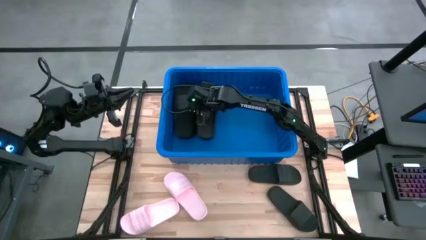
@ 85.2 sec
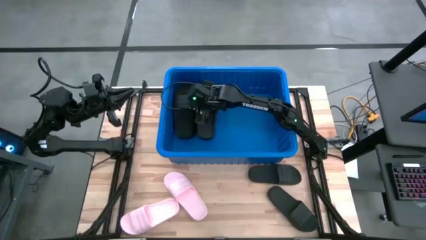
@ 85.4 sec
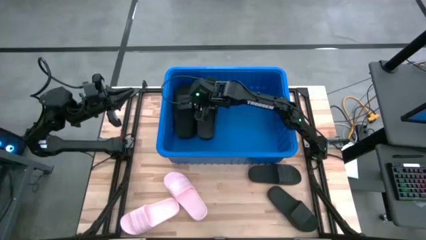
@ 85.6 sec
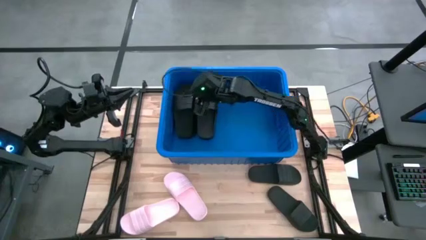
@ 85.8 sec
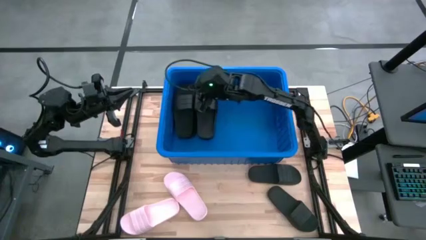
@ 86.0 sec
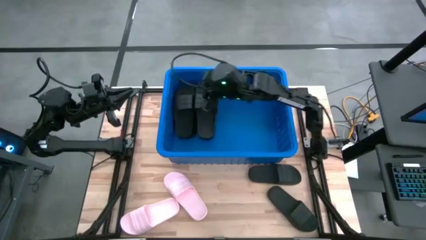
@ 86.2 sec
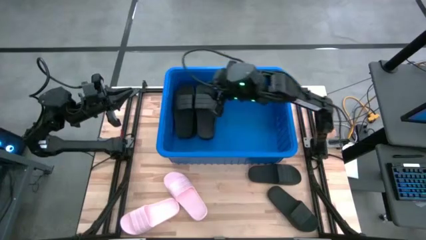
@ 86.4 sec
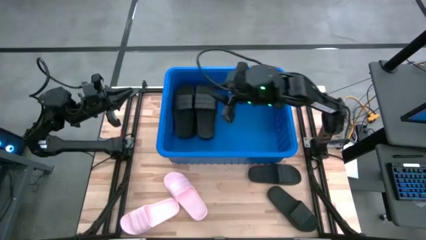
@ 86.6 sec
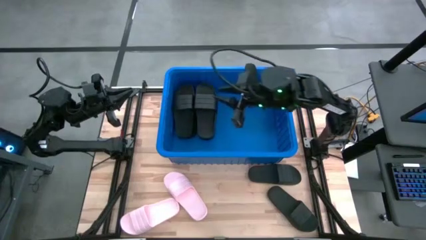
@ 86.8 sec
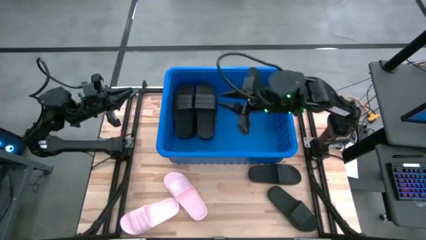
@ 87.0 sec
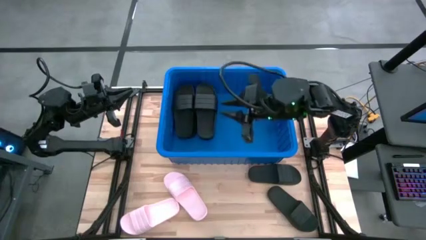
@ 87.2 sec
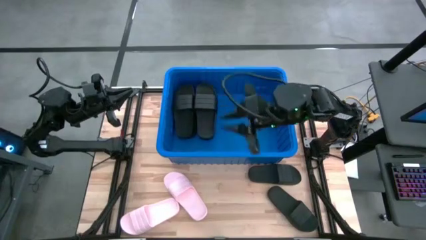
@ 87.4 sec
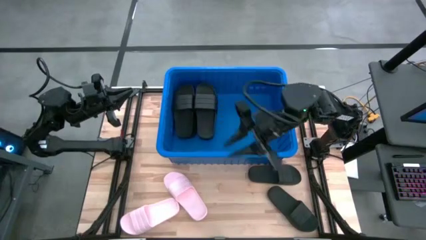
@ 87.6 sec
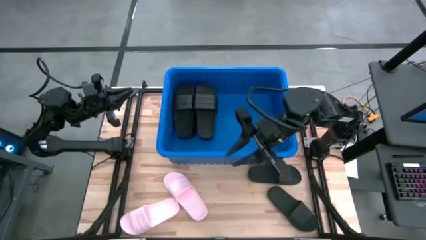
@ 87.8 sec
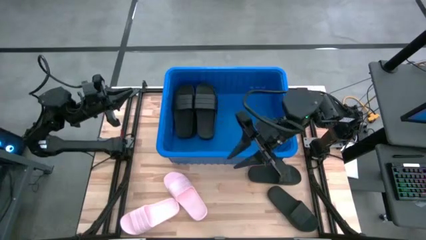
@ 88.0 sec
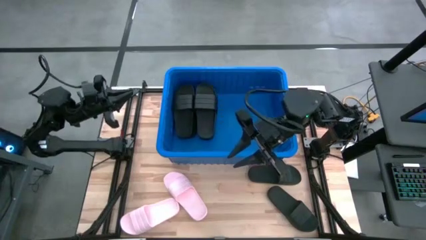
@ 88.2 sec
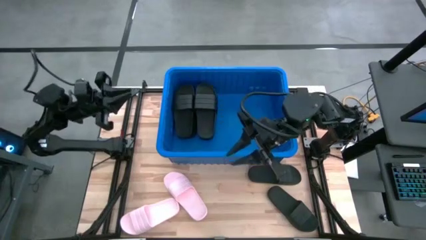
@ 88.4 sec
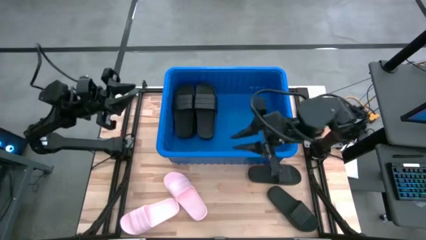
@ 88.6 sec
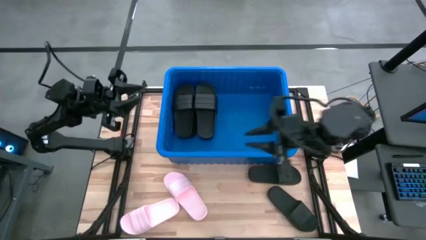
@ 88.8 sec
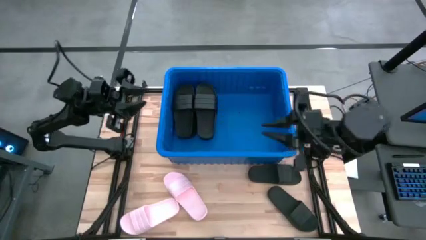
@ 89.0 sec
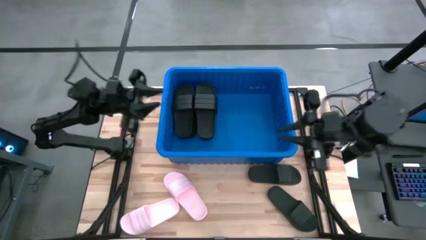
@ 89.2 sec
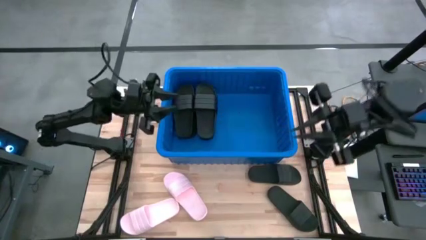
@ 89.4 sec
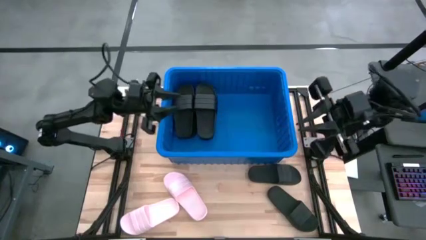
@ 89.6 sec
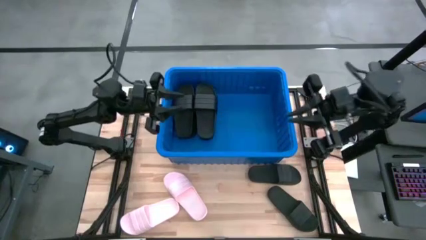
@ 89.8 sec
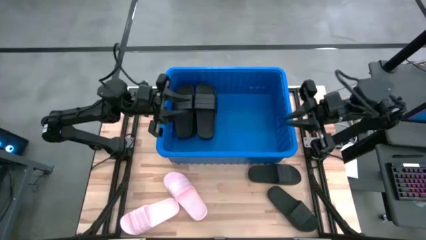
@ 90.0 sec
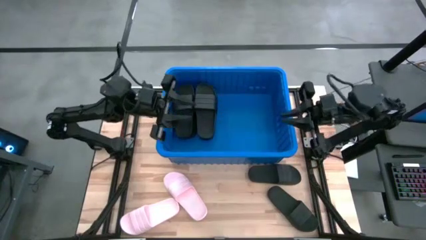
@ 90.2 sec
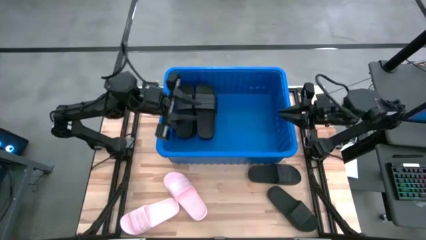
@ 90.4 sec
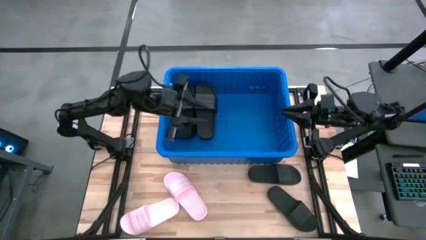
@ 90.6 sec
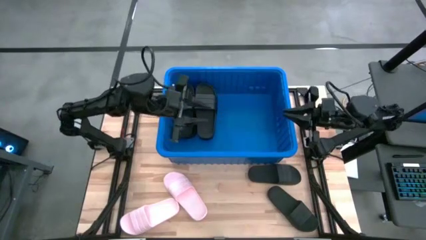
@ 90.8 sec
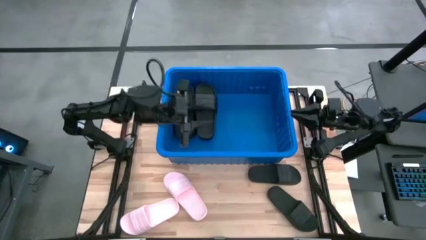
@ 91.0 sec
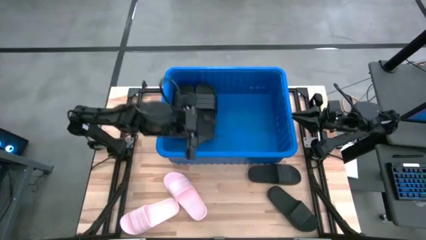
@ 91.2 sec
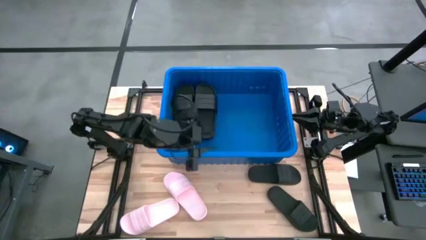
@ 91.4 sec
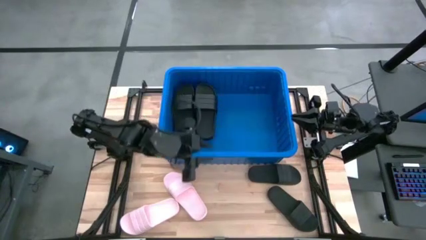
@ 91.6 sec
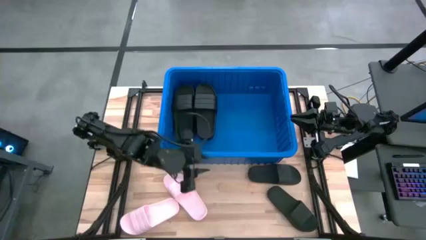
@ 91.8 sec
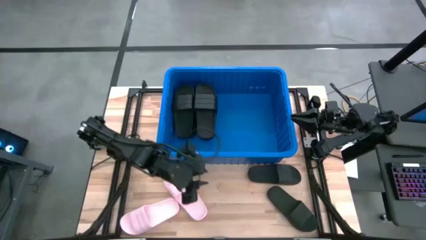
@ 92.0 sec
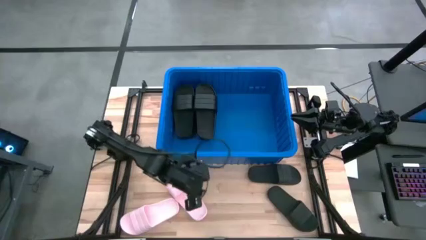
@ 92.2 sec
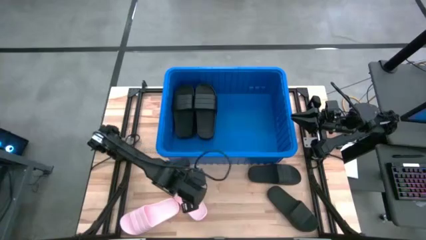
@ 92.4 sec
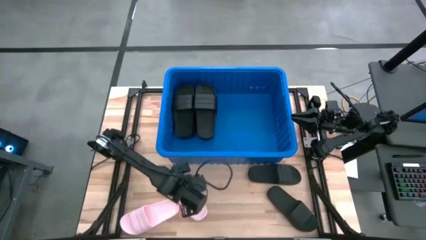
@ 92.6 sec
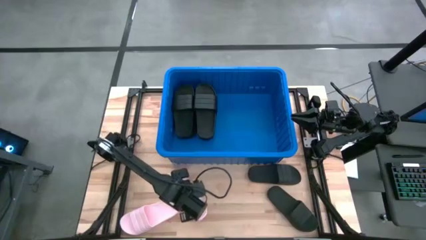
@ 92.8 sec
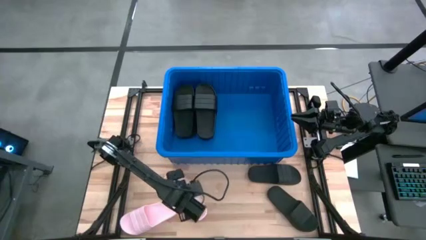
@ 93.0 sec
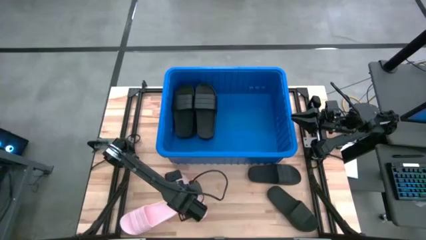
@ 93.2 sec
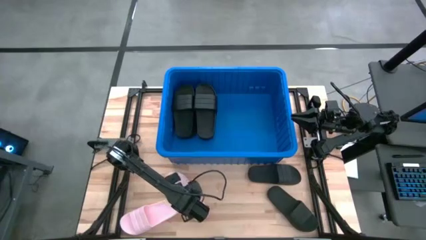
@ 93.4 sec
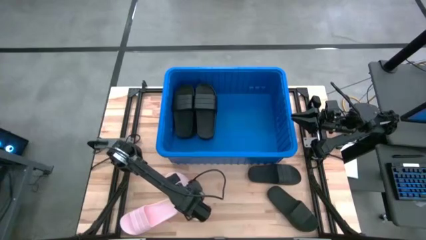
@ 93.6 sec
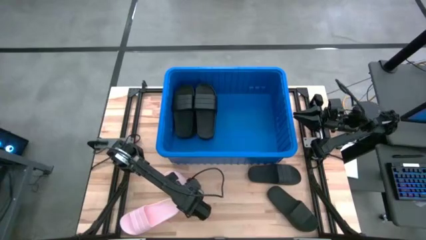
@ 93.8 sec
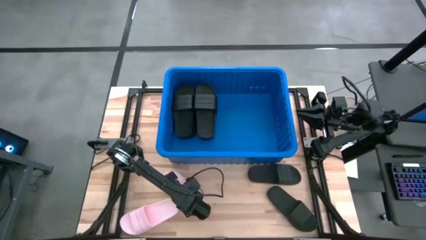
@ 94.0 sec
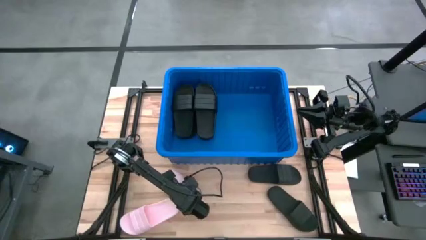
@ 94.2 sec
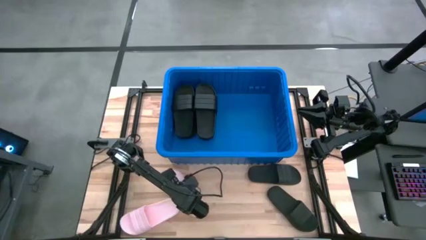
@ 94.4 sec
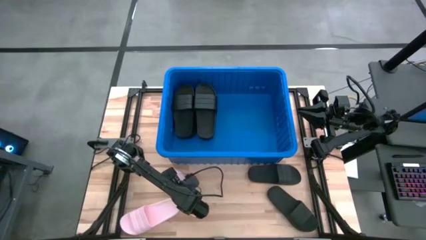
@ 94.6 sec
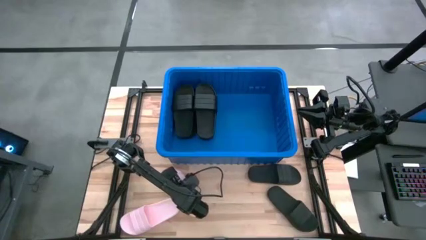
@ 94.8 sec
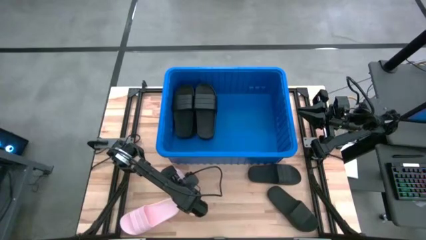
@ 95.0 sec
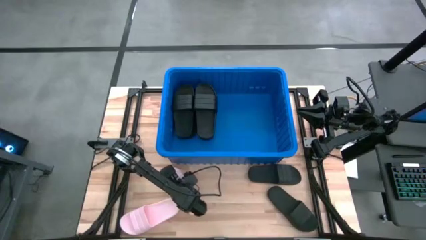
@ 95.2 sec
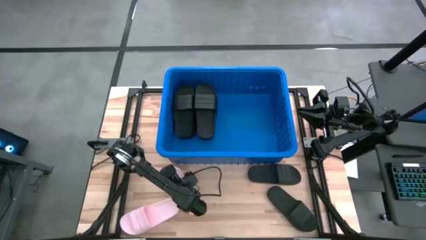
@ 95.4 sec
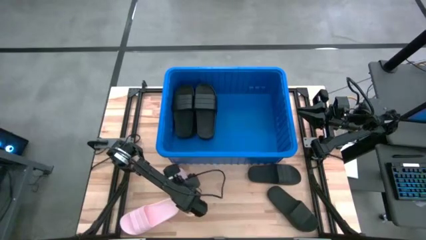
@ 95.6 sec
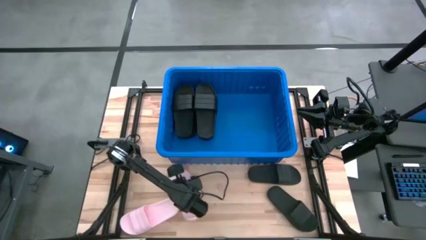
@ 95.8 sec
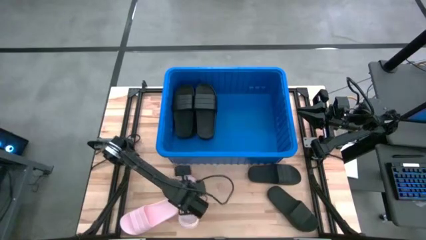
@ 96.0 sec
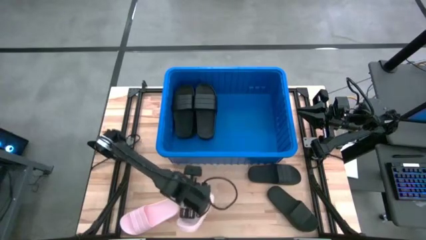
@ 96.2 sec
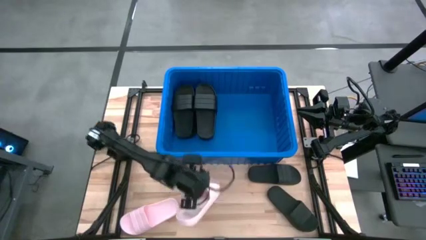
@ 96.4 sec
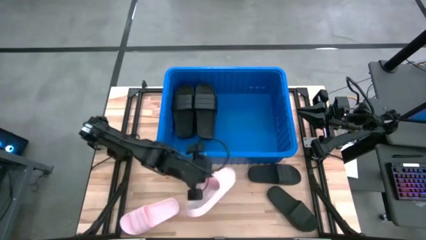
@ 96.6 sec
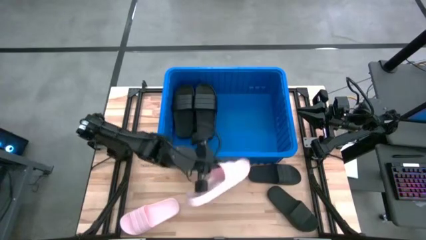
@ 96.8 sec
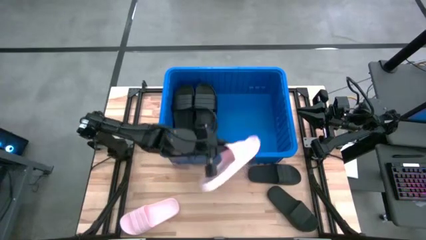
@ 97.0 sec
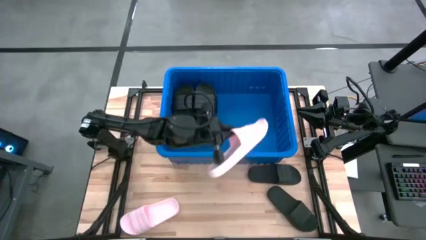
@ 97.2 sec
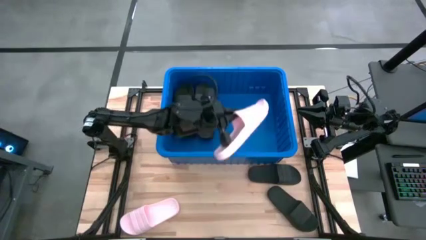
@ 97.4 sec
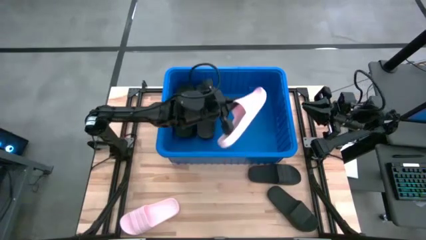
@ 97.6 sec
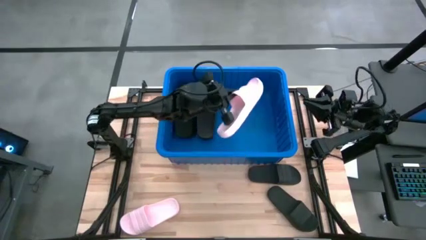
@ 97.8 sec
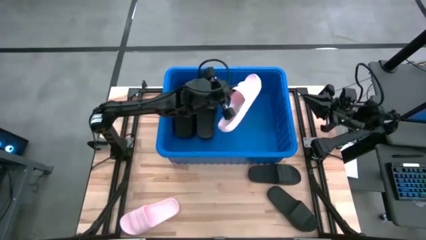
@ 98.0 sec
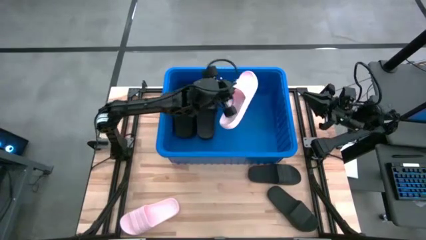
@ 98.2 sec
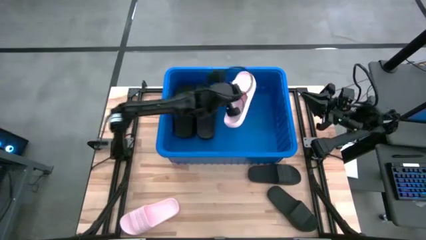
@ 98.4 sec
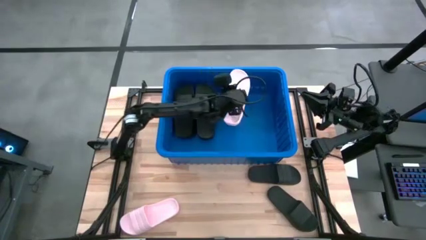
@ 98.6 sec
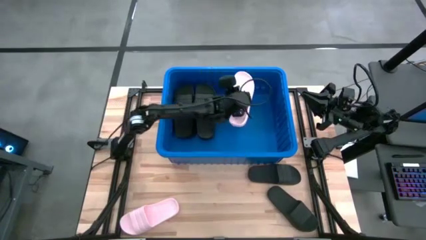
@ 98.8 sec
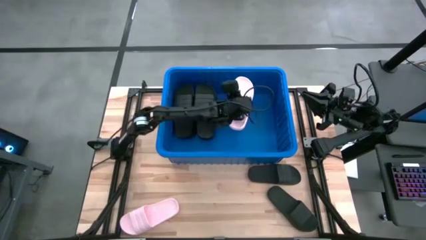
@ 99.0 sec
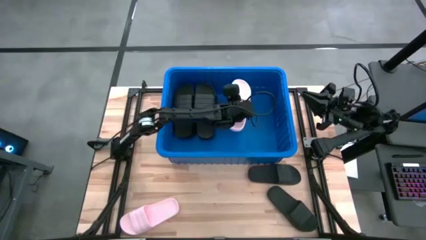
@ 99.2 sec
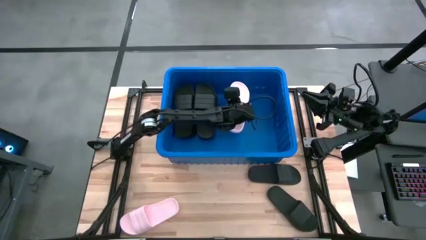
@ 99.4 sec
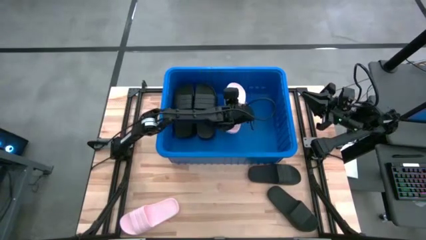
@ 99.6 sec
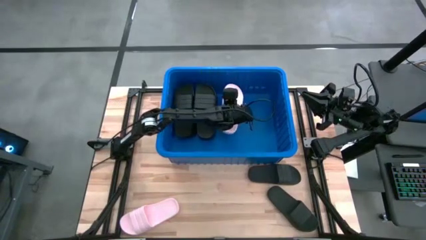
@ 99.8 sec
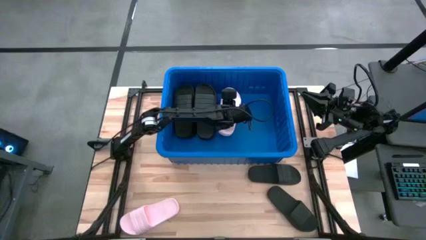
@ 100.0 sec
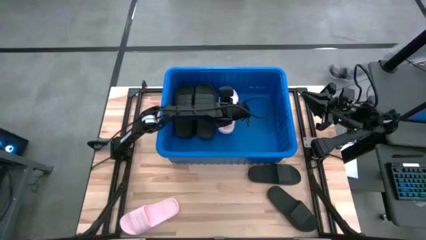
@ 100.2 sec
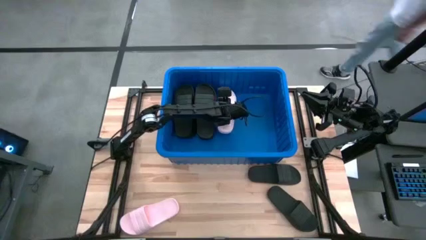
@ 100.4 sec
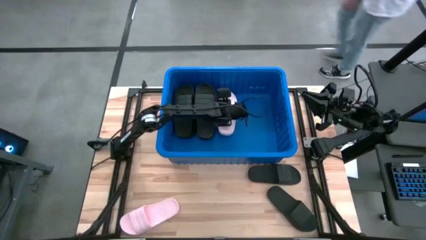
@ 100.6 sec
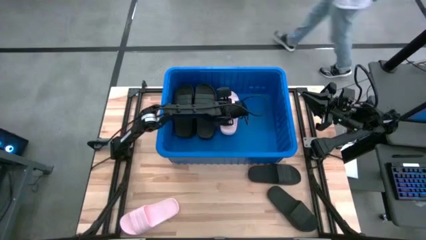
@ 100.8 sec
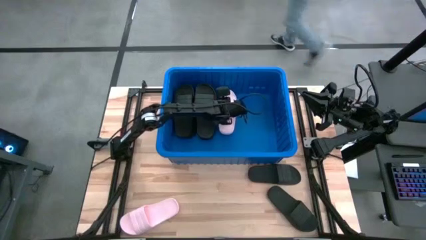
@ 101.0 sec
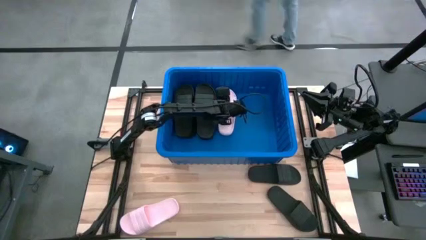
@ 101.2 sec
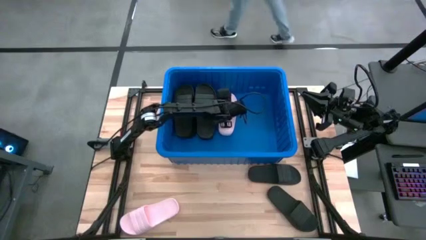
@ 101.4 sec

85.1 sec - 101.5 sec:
Task: Pick and place slides into bin
Put the right pink slide into the blue bin
